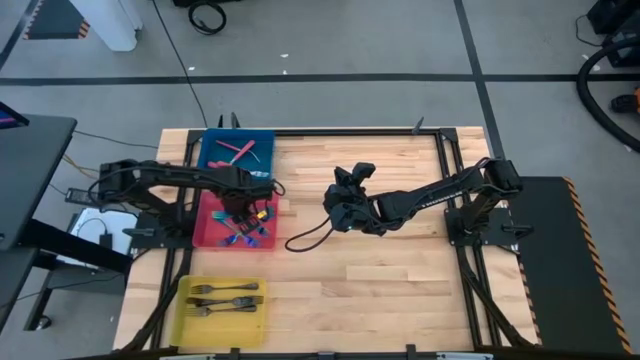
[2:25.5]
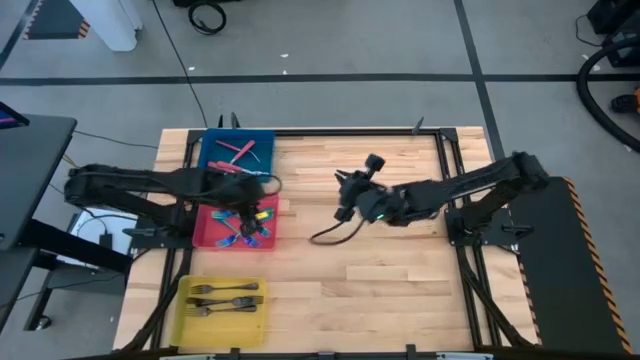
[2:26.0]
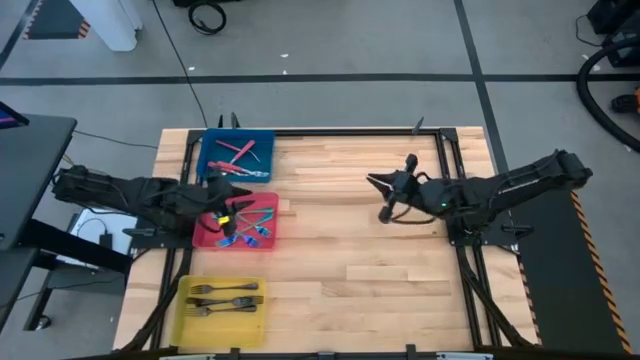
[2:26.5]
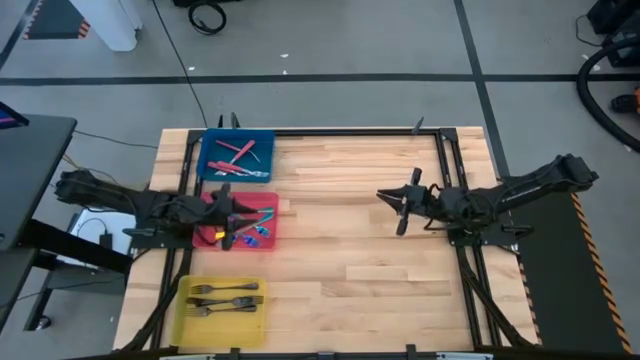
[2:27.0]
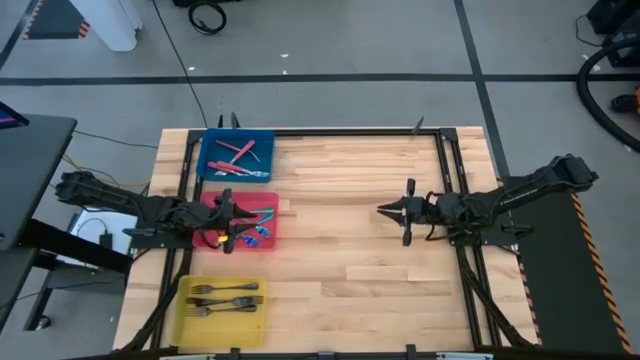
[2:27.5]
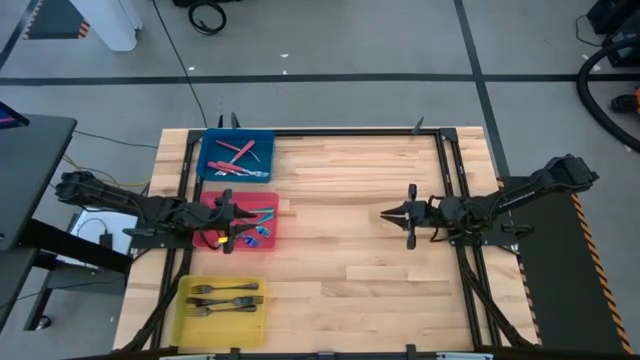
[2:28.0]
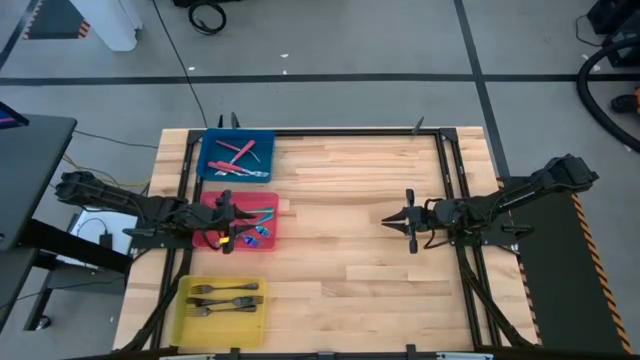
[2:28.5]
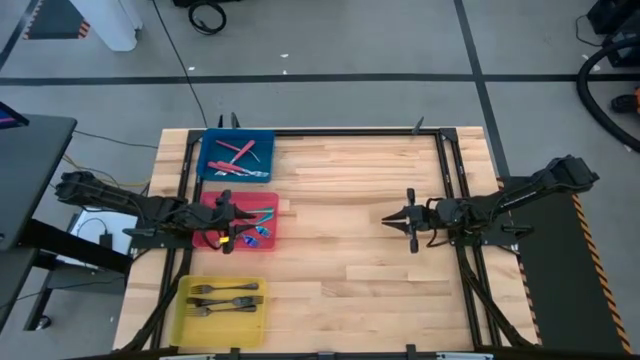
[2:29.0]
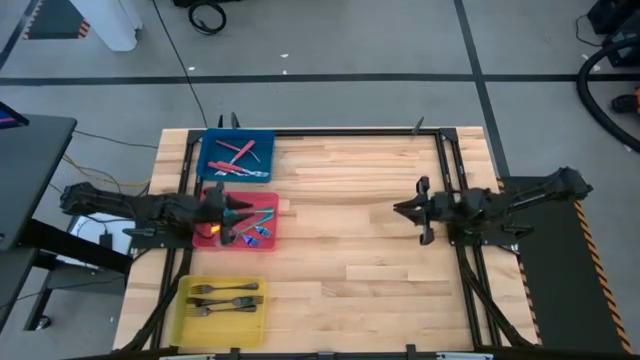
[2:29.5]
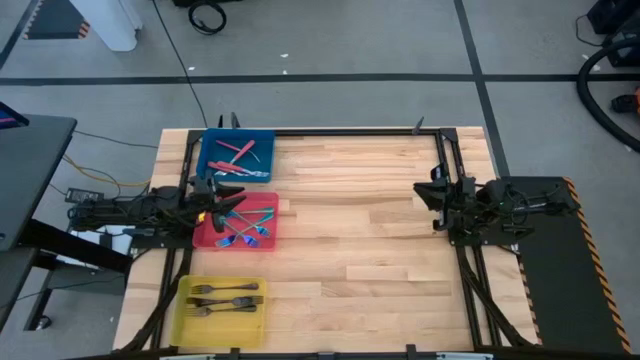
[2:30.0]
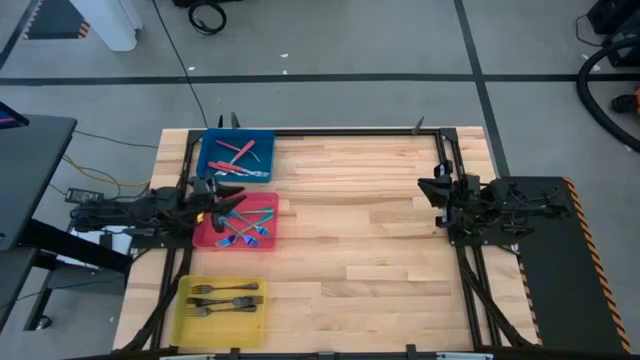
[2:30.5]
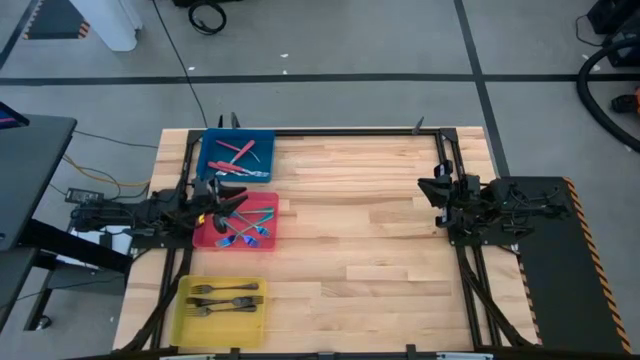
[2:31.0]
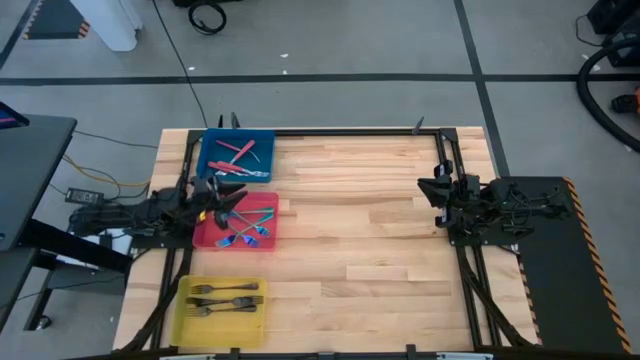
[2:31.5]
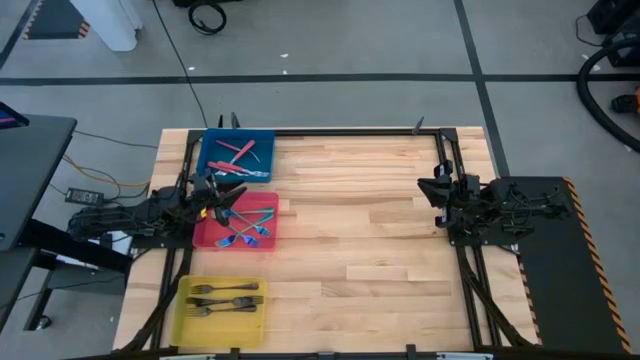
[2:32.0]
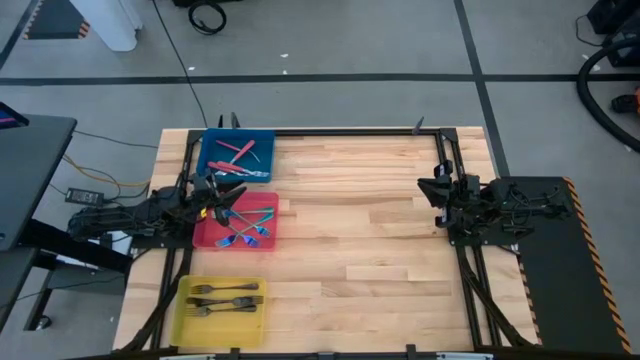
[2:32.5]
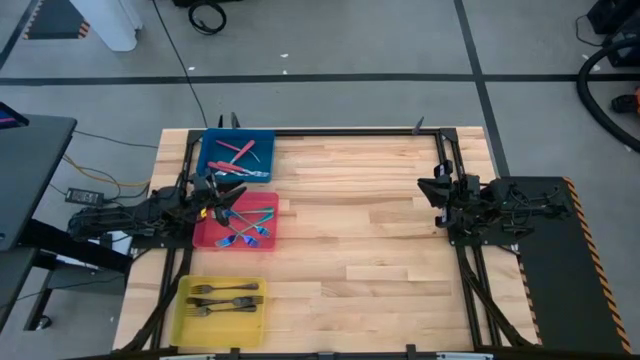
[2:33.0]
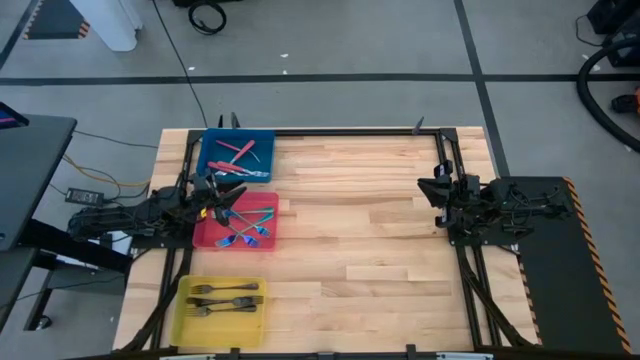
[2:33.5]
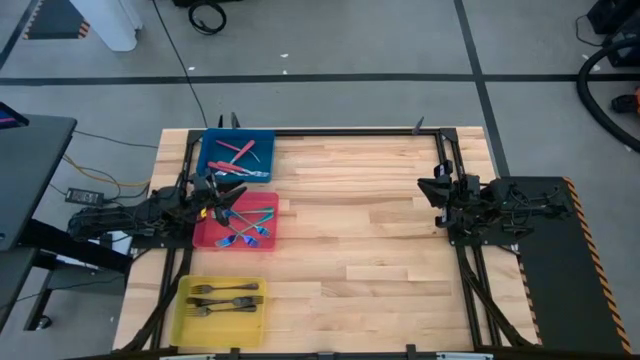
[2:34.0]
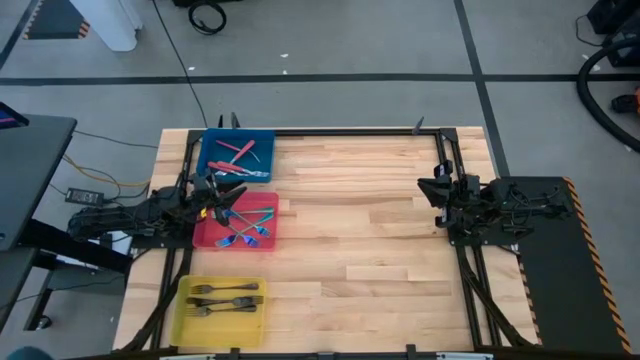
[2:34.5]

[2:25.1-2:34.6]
Task: Sort silverware by color (type)
Return to Home Position

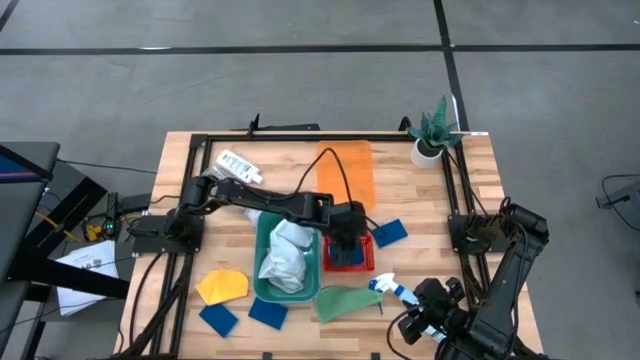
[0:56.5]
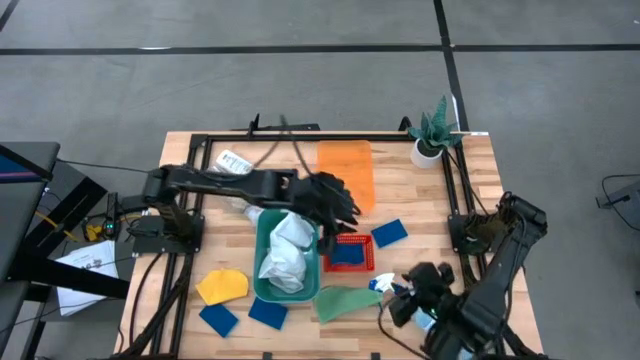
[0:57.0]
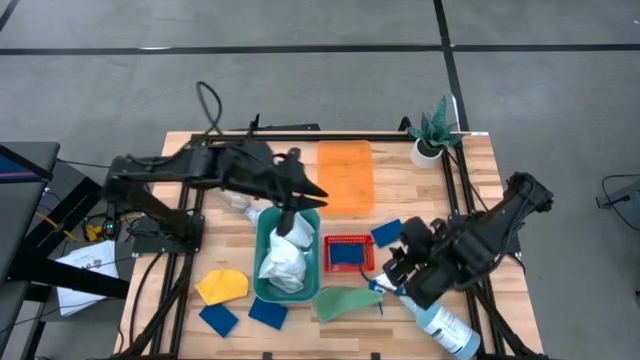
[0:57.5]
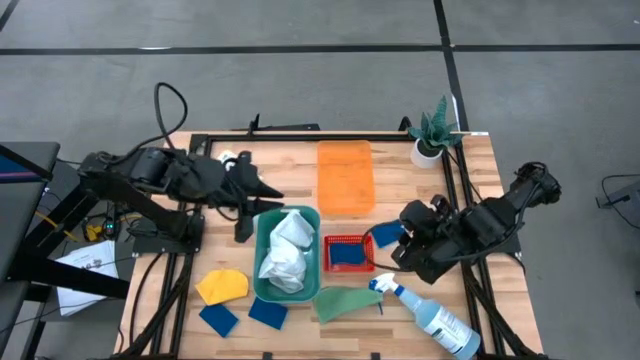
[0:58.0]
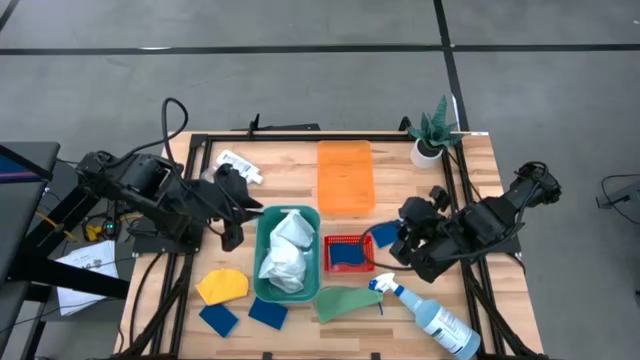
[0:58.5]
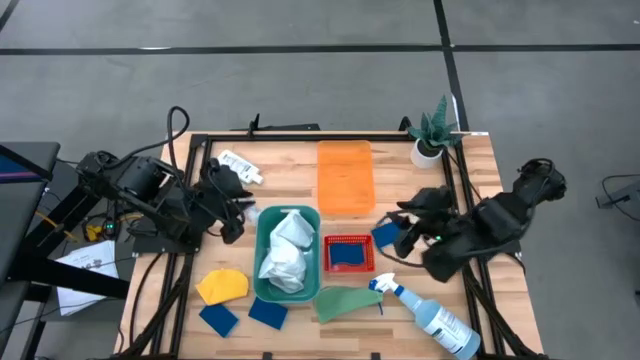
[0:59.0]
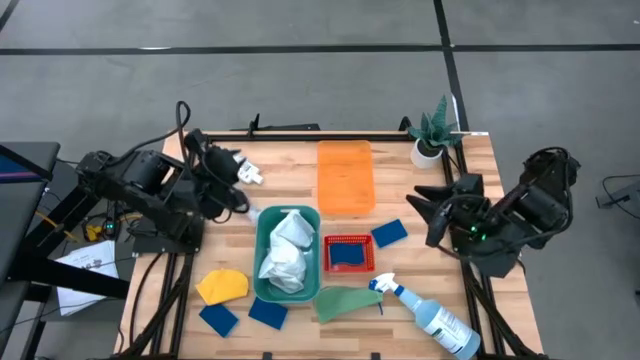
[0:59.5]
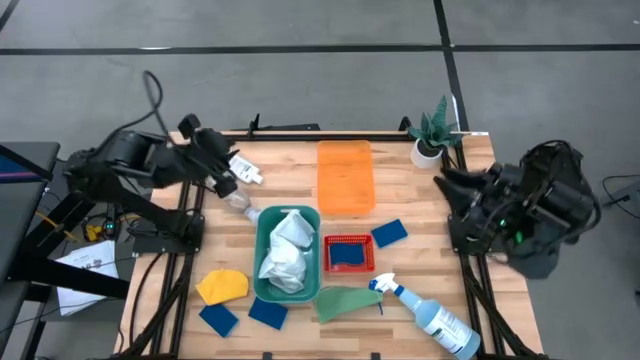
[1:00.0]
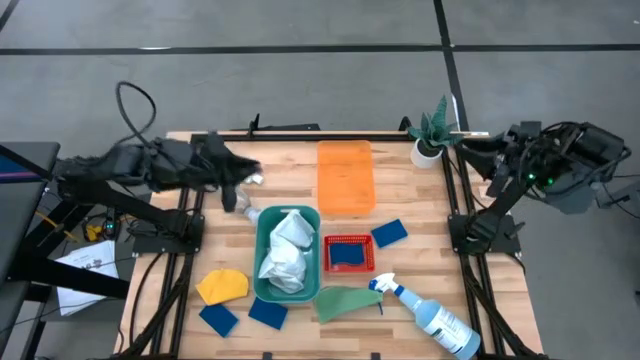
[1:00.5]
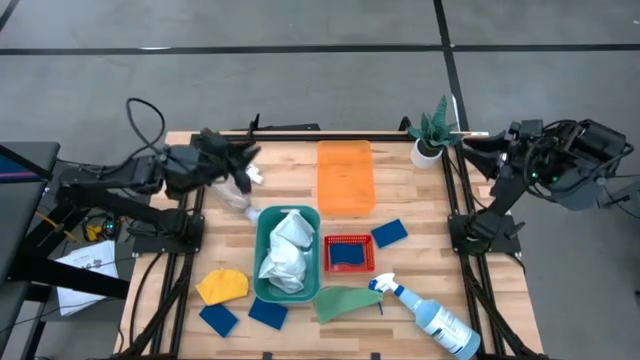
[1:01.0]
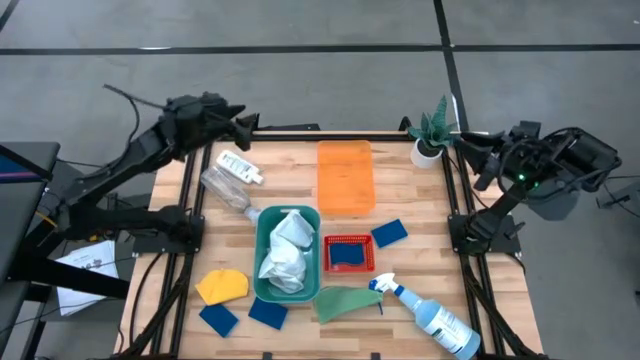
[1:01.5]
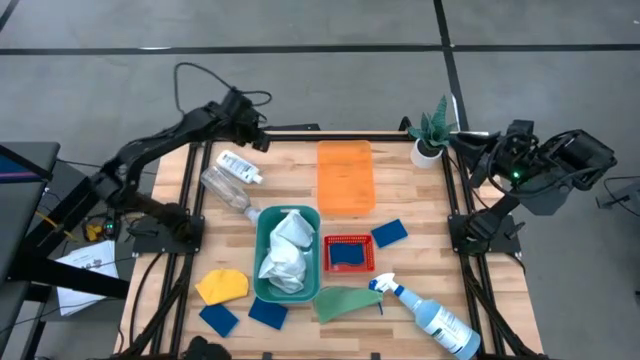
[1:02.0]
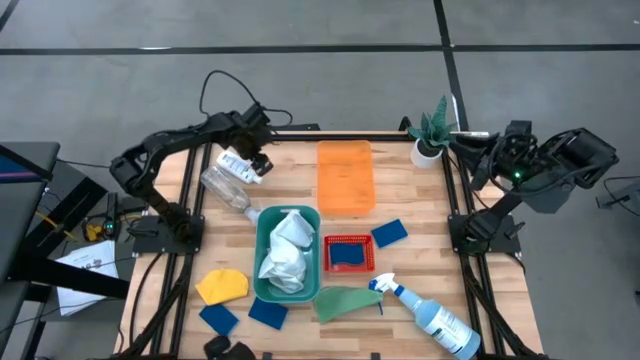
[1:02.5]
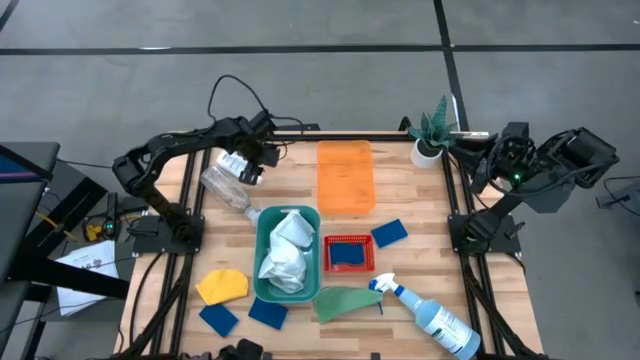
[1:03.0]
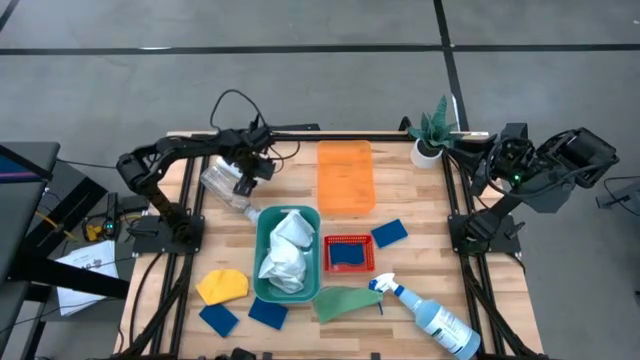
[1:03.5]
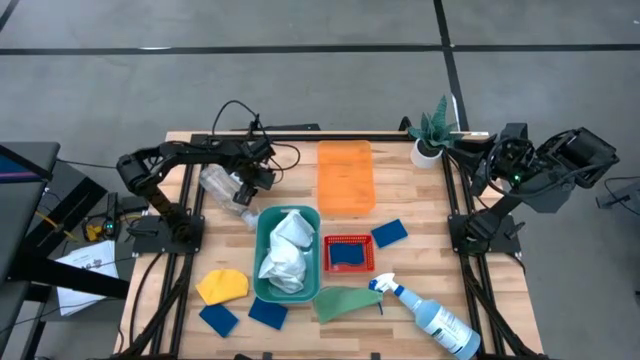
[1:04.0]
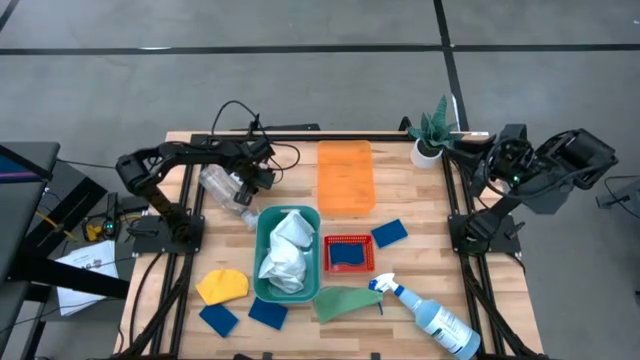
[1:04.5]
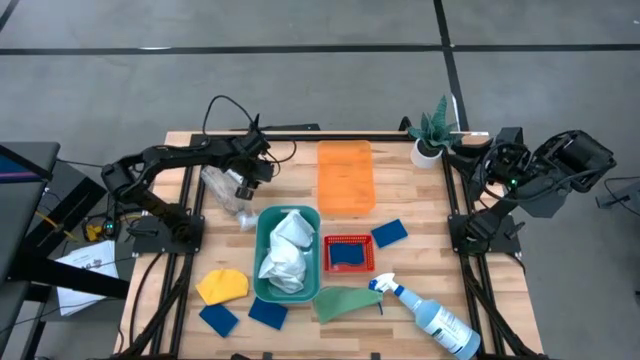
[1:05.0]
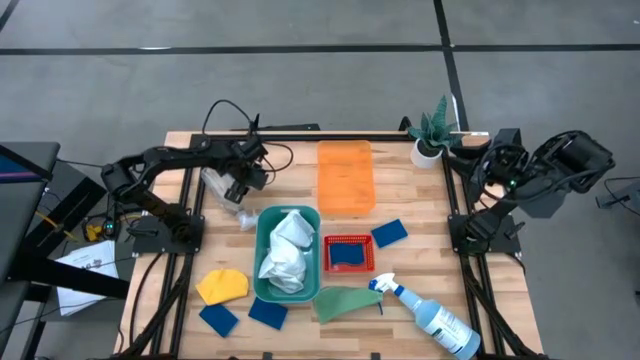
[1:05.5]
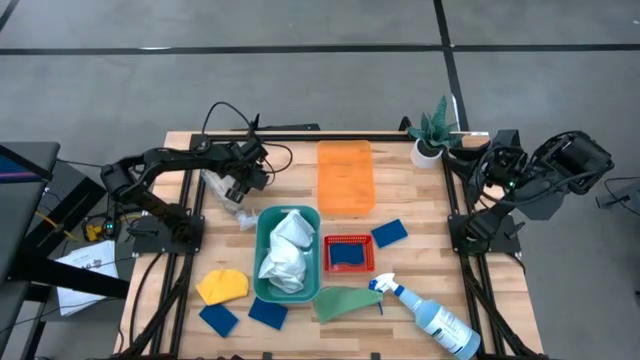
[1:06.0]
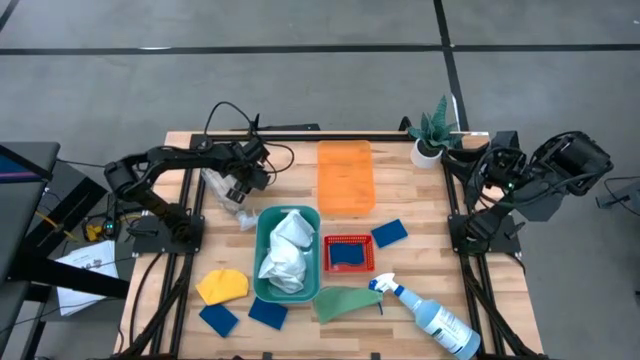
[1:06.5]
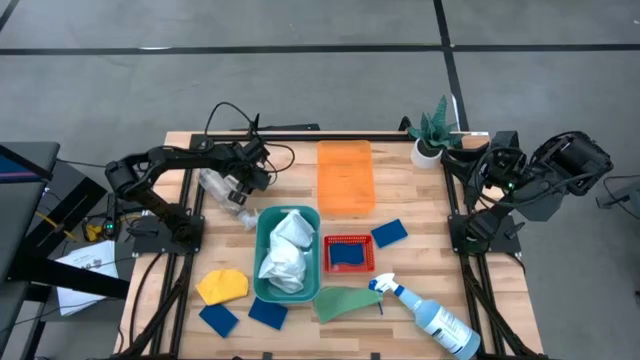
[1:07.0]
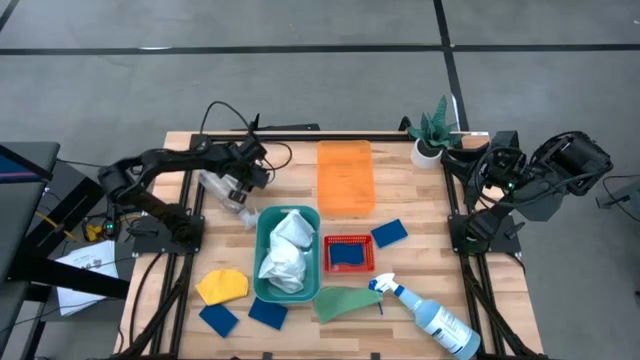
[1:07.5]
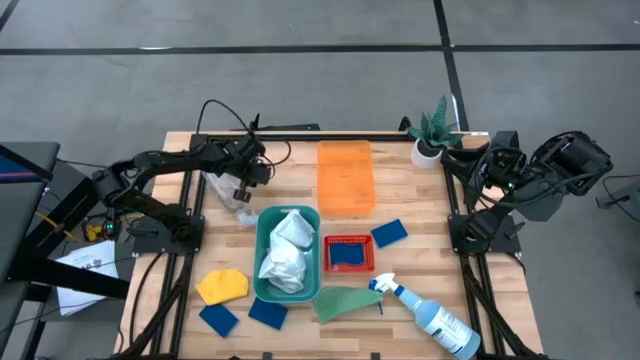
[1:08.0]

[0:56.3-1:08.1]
Task: Pick & Place Kitchen Items
Put the white plastic restorer bottle into the orange bin
